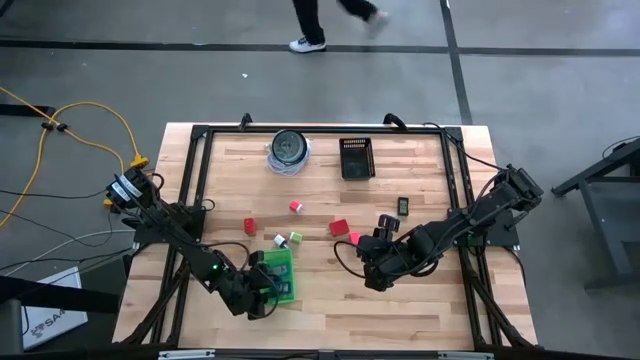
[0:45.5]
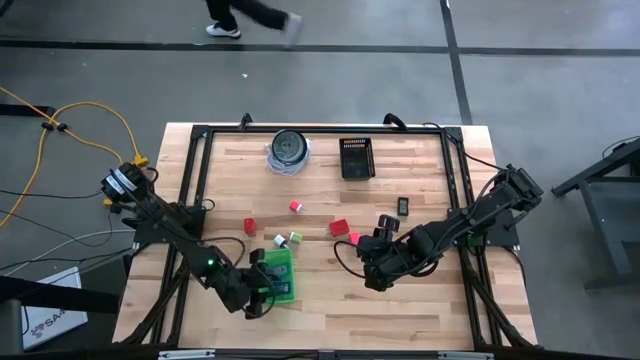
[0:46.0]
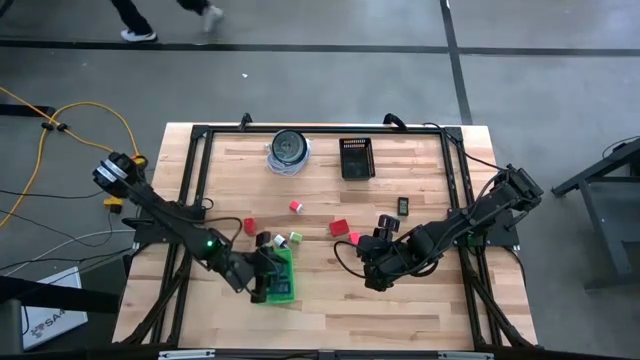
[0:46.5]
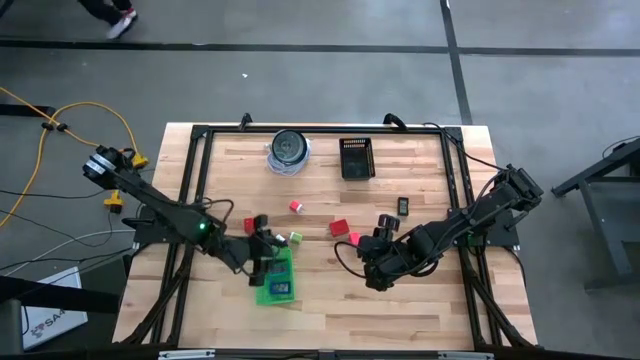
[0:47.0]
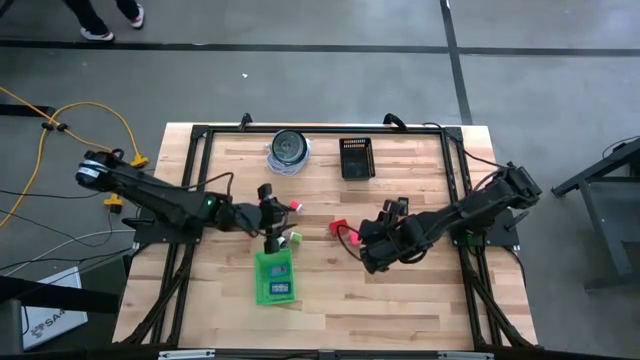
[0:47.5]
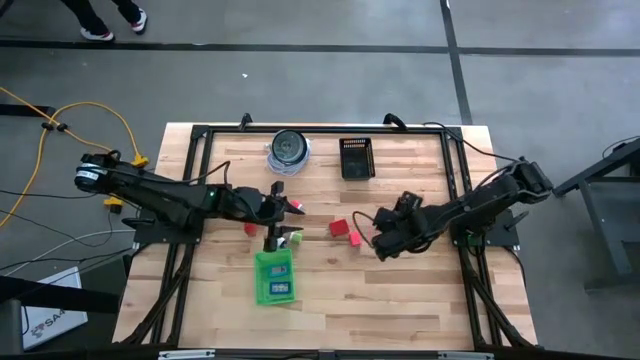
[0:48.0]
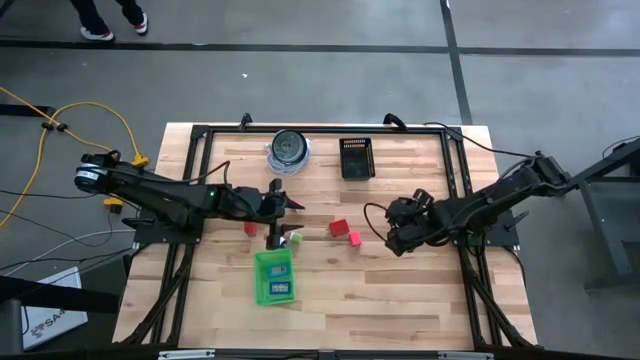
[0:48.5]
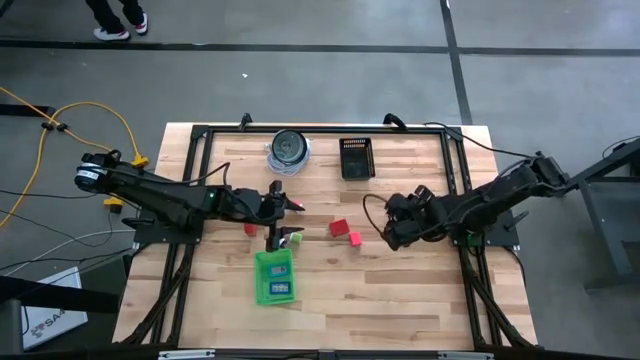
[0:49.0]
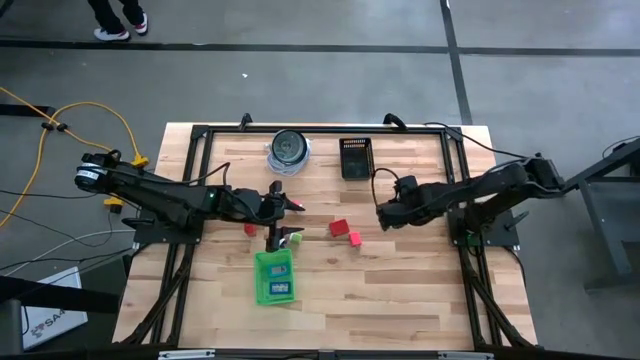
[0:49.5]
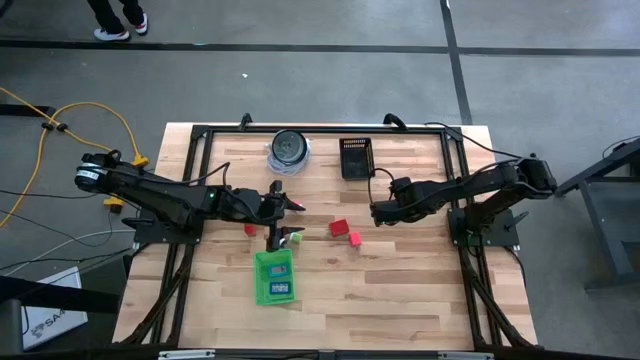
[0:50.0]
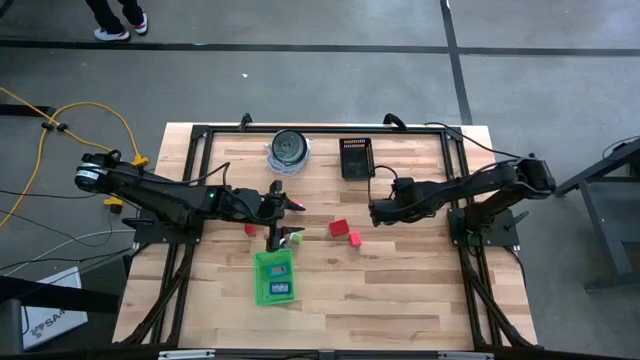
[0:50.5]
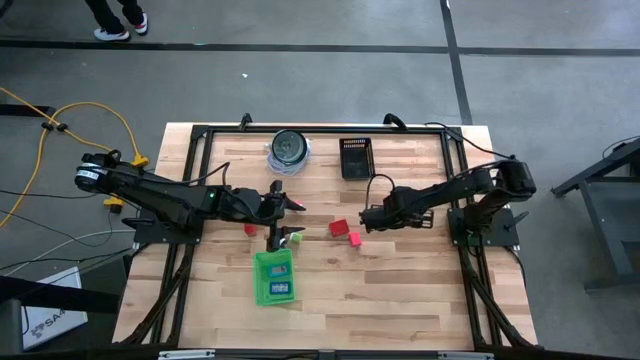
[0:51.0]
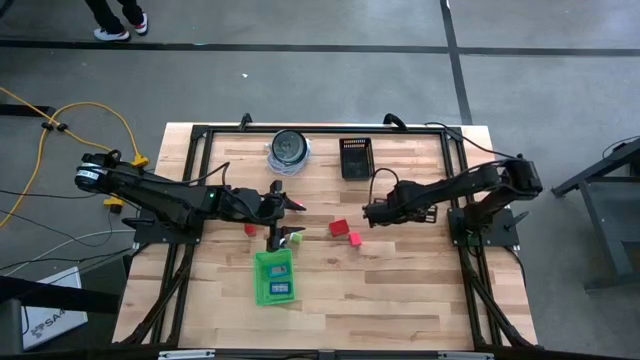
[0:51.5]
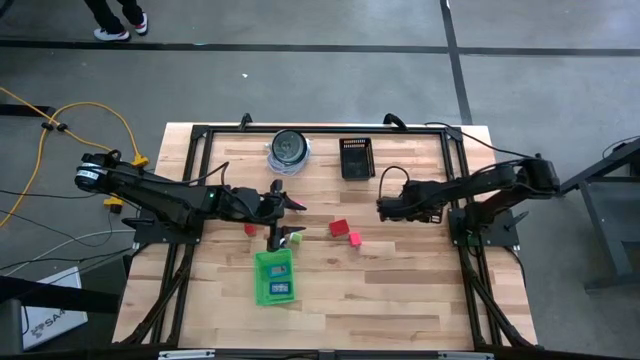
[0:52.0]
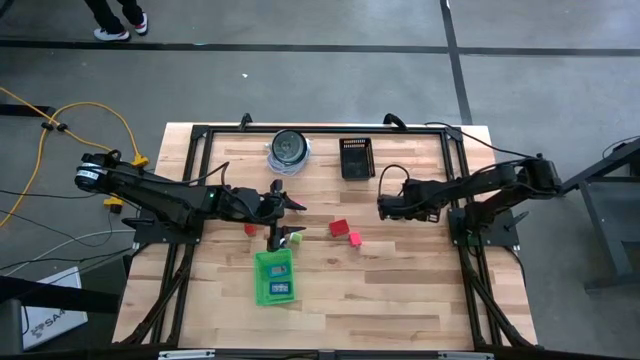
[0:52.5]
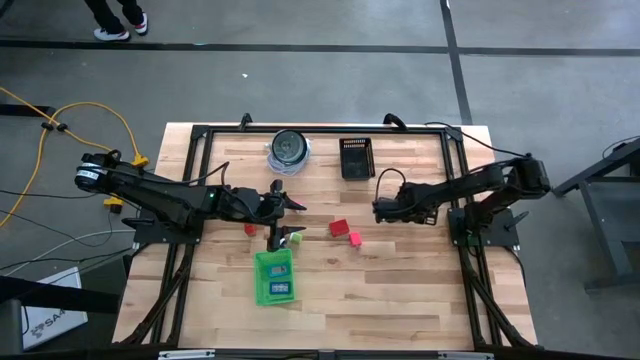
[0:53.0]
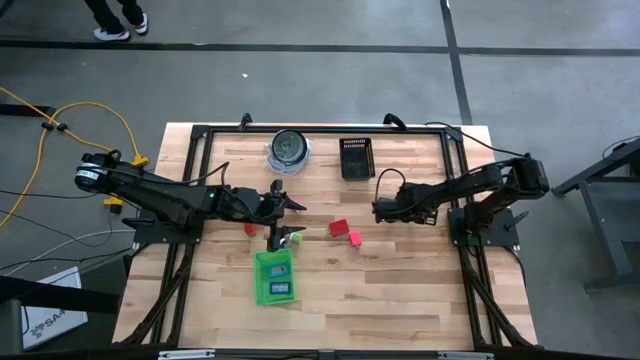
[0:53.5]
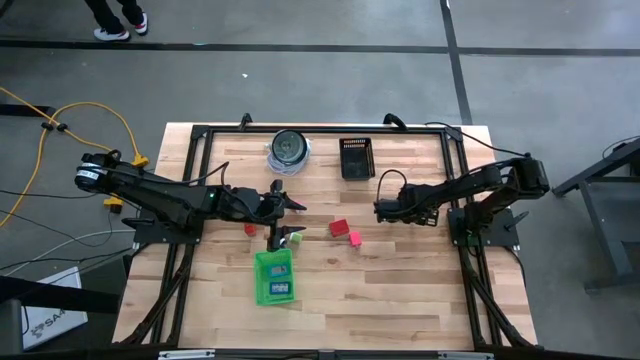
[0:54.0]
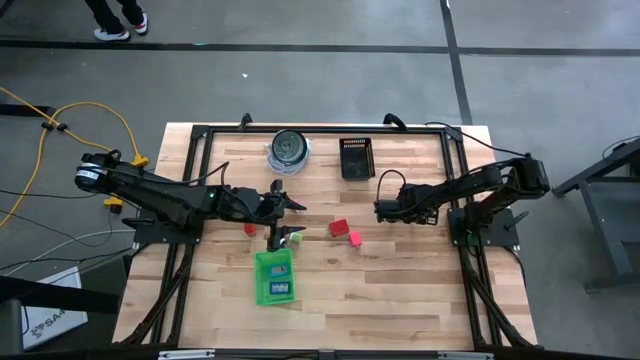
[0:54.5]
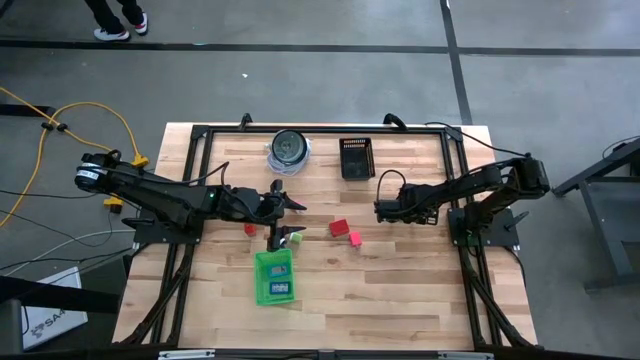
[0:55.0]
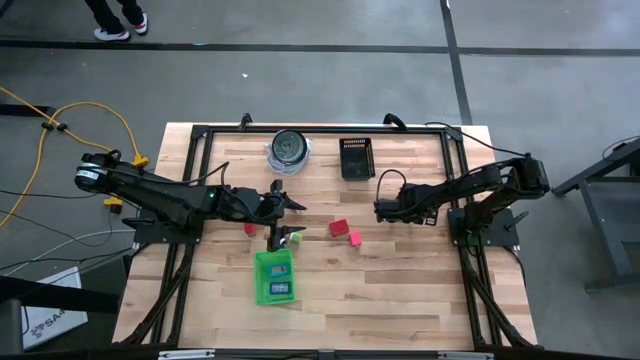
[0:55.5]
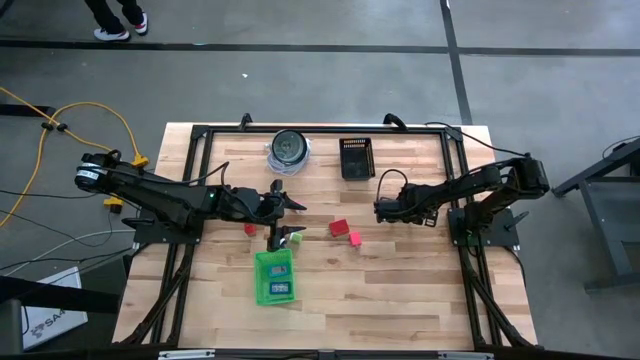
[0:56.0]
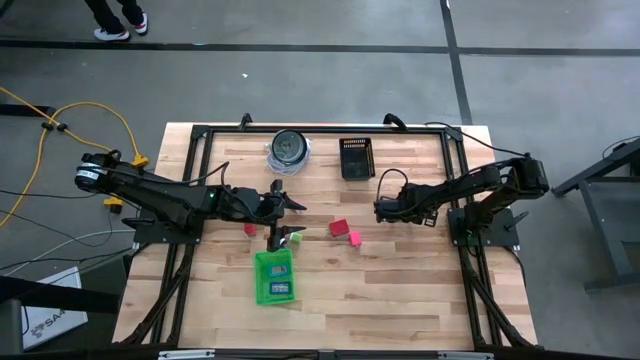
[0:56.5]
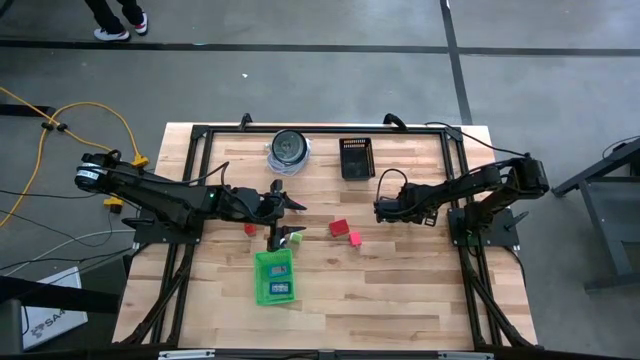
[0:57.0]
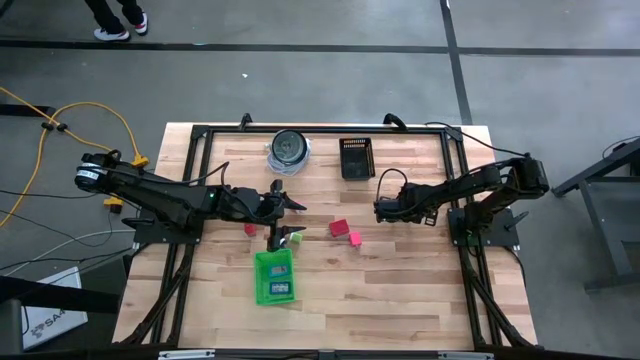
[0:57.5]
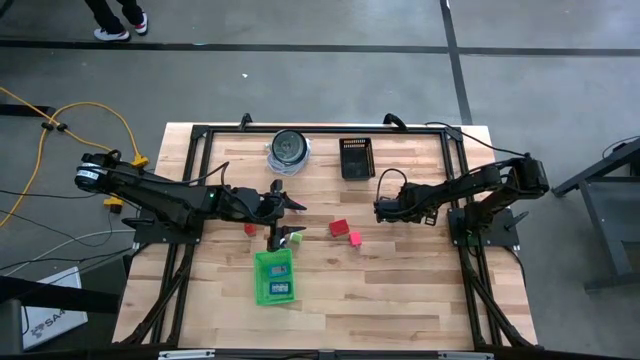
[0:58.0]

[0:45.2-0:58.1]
Task: Pick & Place Office items
Put the black digital clock into the green bin
